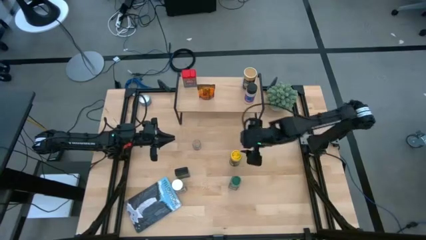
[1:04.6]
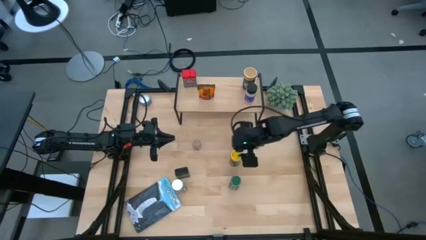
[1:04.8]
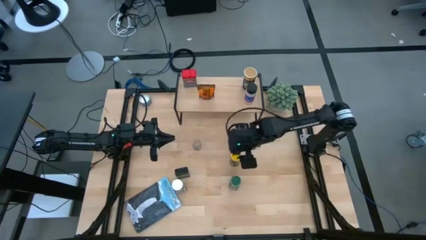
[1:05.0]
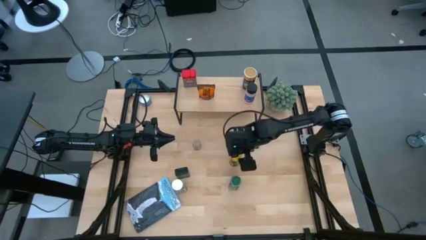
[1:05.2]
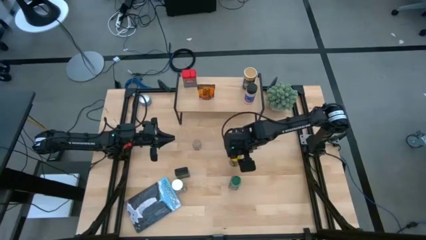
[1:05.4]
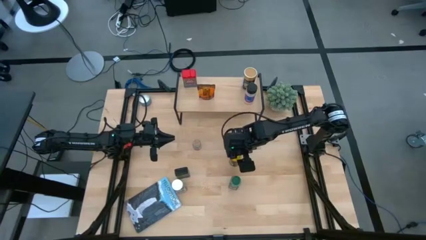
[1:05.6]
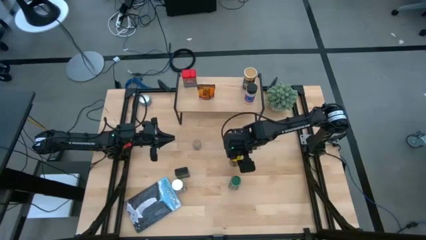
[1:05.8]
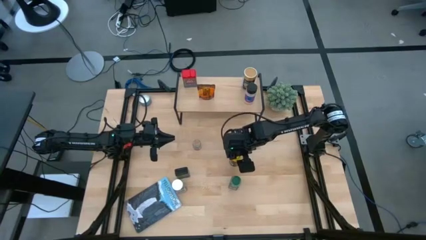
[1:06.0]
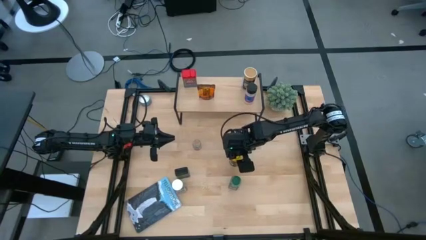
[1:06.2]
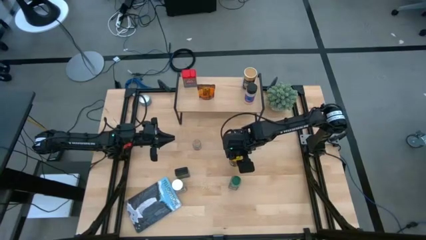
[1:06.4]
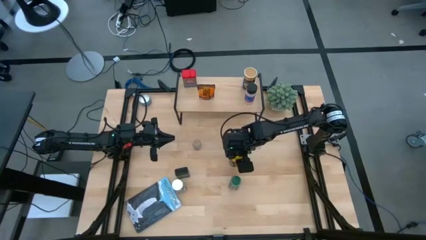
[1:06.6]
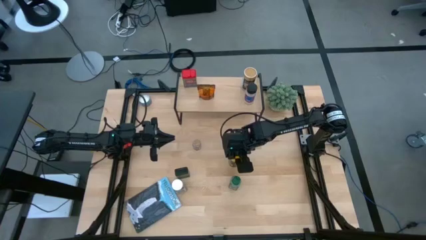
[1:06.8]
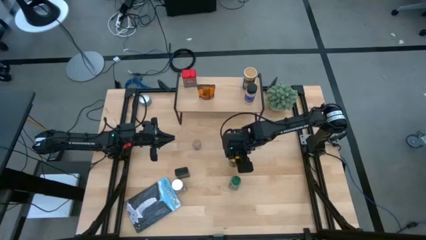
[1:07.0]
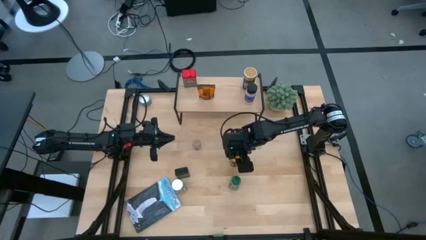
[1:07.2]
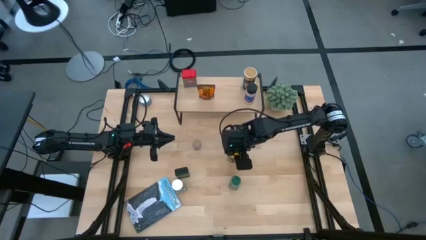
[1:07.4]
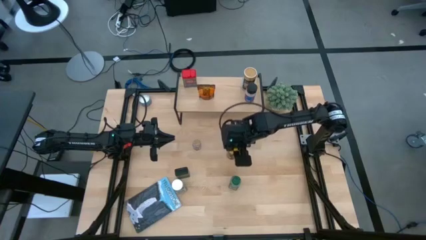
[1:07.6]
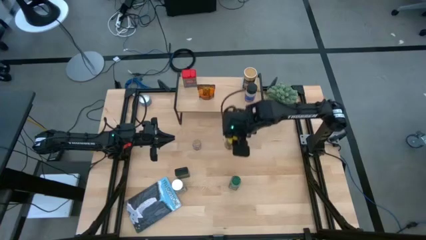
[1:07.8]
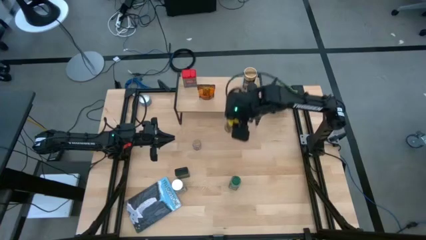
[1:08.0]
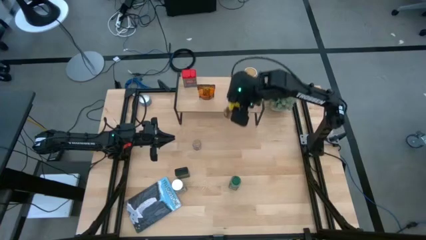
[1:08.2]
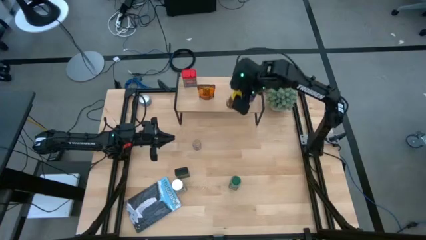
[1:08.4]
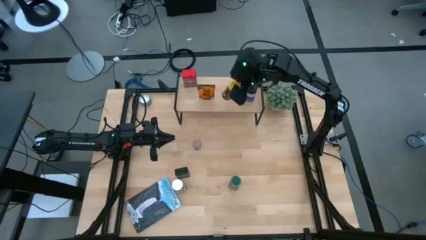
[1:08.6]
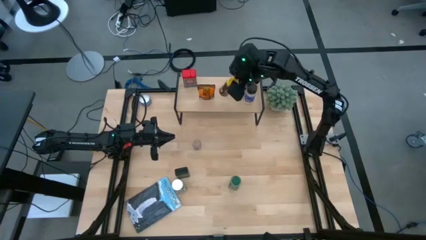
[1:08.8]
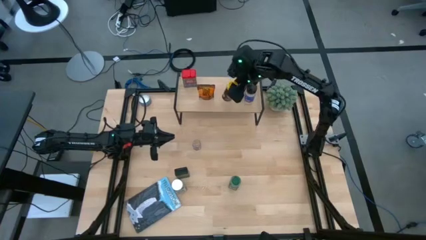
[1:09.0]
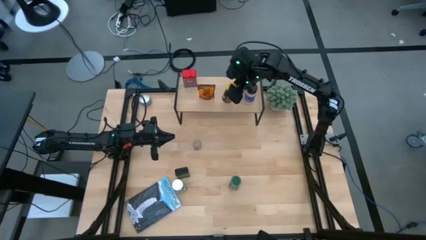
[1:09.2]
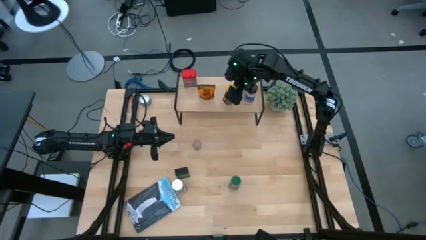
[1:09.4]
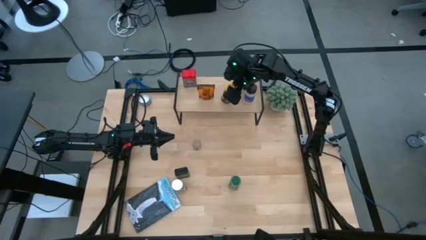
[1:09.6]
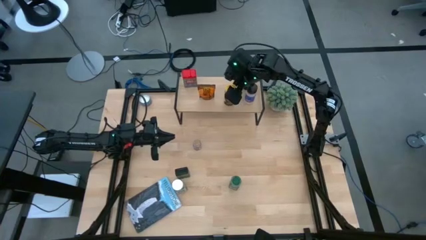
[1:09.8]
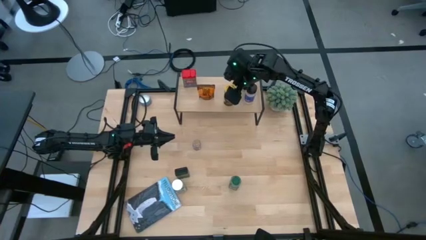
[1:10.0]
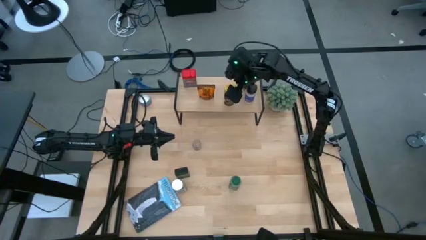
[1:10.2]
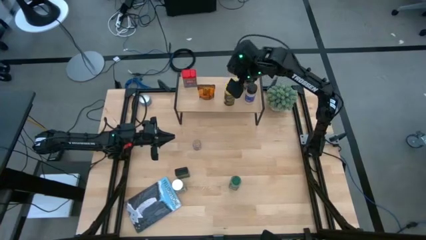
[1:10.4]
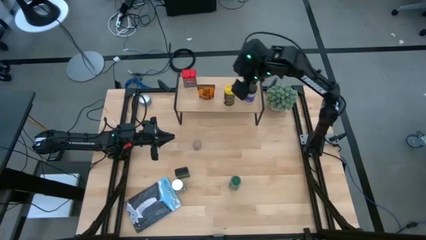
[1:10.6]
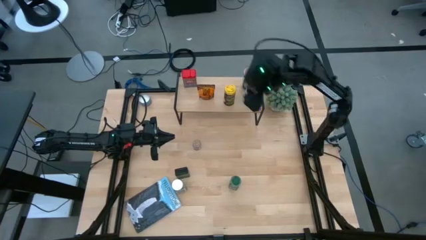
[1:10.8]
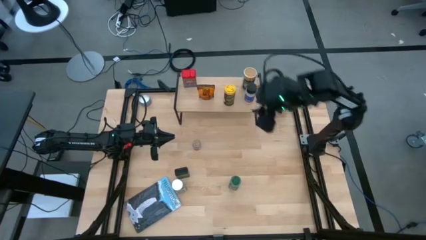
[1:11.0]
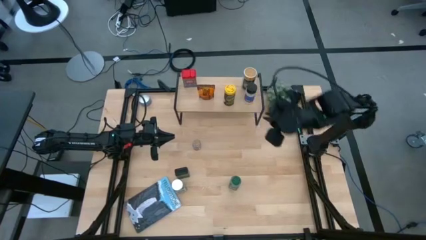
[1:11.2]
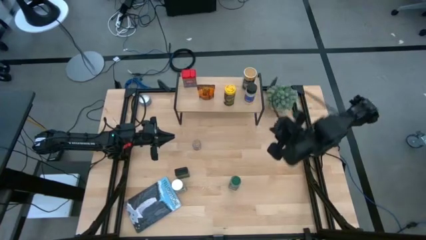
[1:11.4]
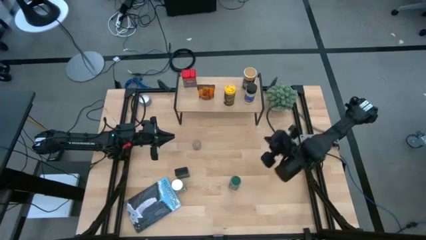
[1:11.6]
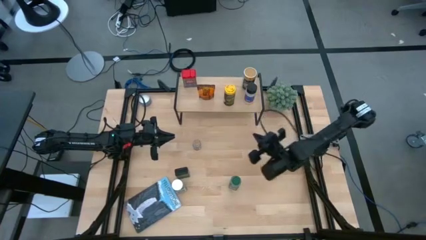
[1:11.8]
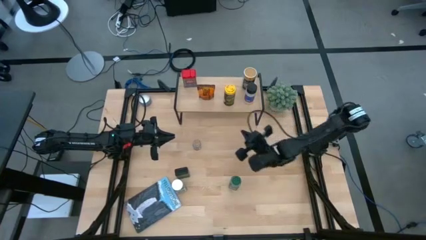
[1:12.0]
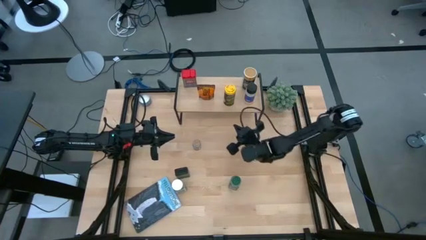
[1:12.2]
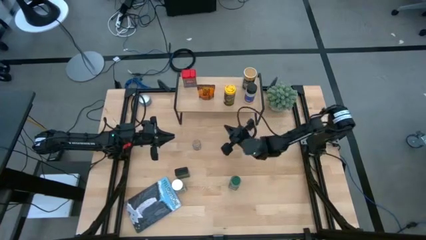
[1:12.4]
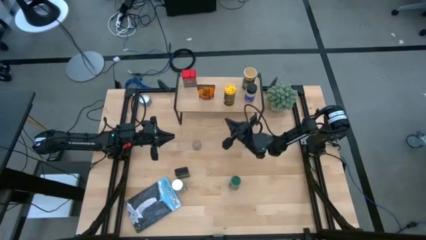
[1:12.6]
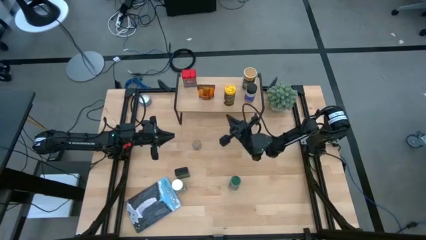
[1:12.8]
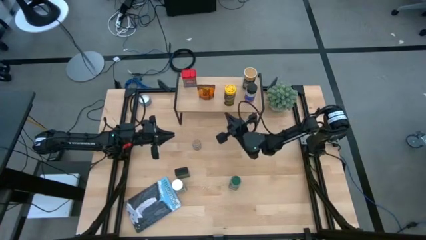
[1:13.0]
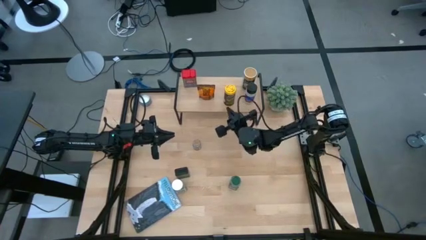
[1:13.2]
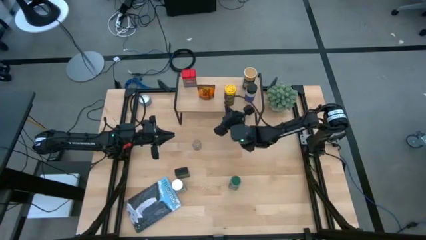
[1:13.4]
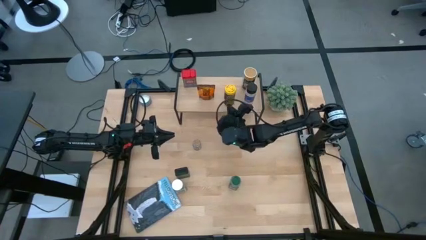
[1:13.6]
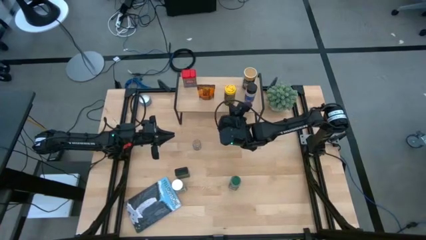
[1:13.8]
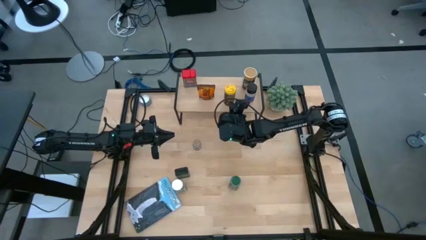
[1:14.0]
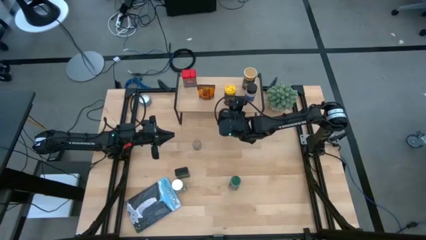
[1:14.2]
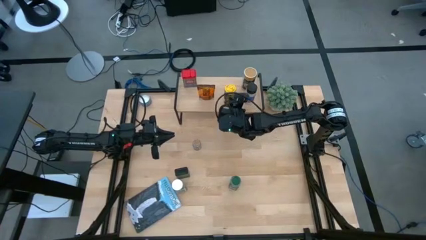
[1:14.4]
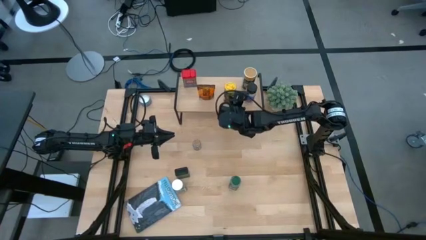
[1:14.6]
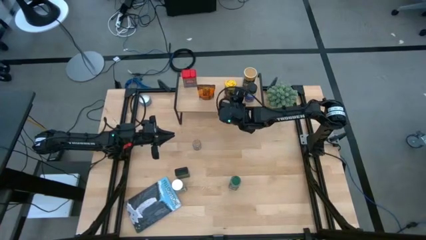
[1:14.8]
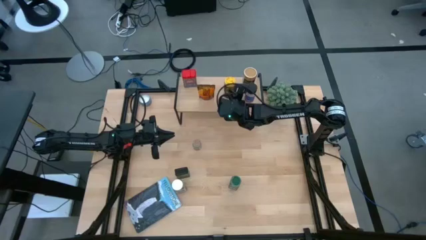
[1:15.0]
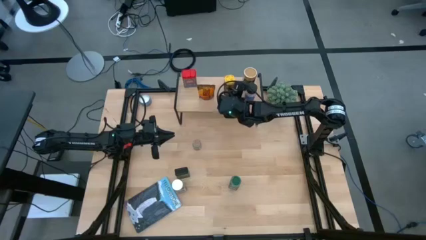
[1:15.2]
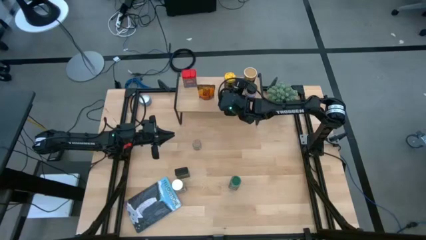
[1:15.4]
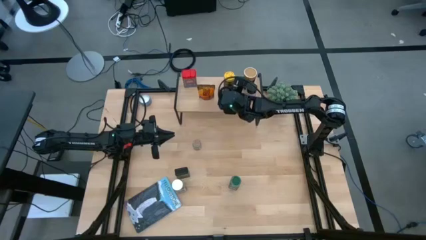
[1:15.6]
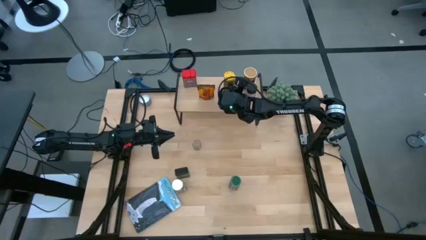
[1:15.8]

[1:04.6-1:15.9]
Task: Shelf spices
Put the yellow seasoning bottle on the shelf
